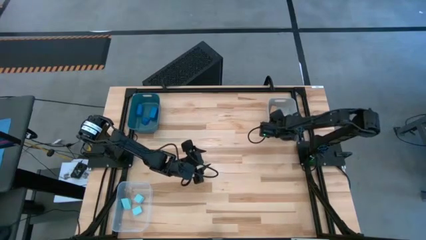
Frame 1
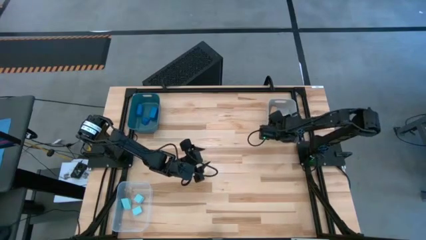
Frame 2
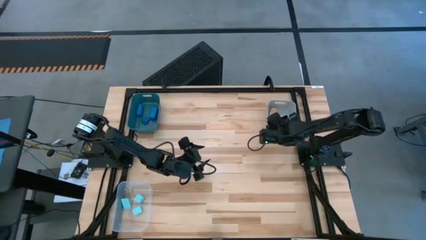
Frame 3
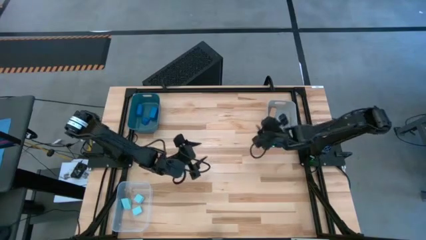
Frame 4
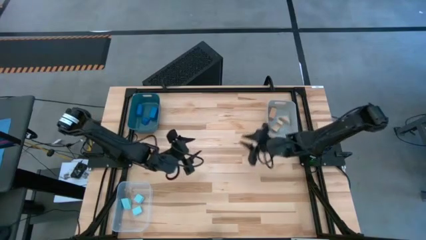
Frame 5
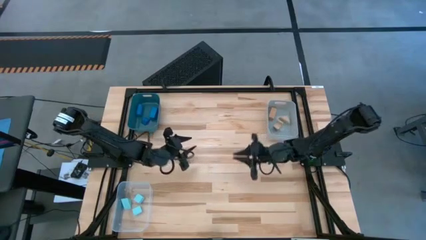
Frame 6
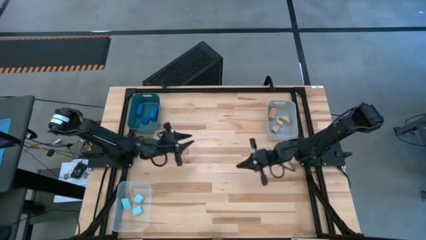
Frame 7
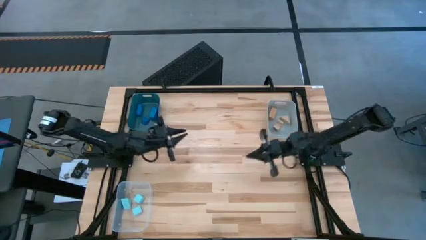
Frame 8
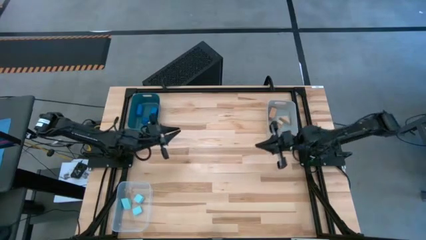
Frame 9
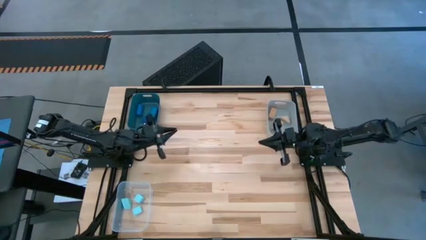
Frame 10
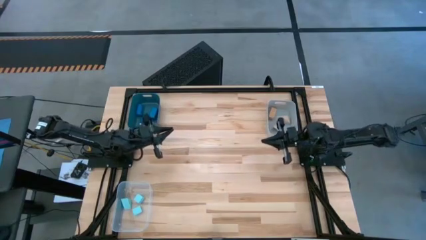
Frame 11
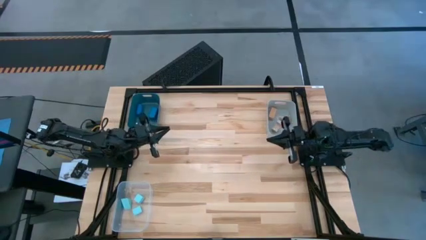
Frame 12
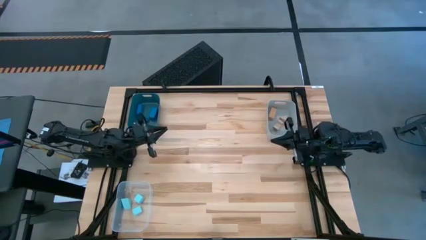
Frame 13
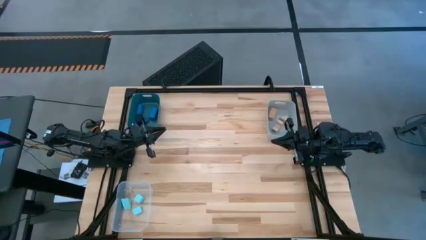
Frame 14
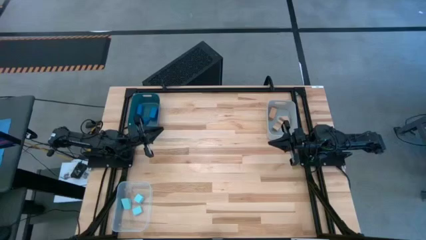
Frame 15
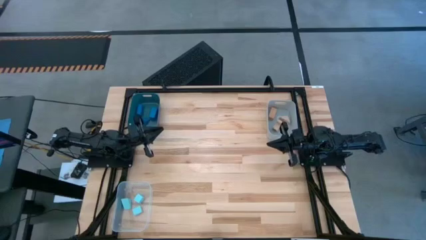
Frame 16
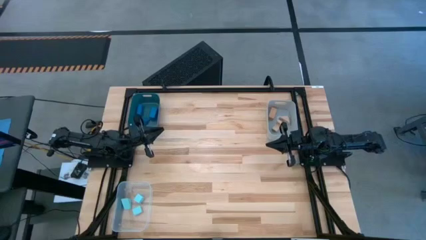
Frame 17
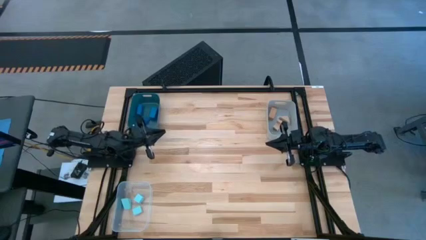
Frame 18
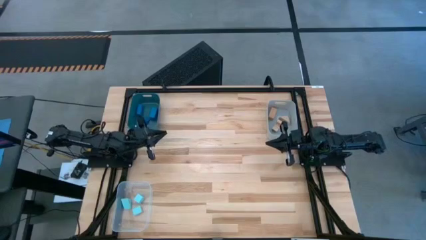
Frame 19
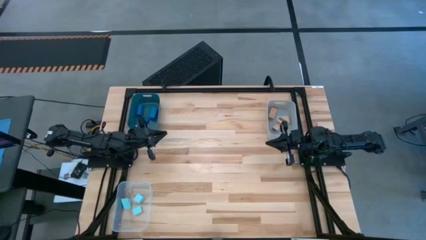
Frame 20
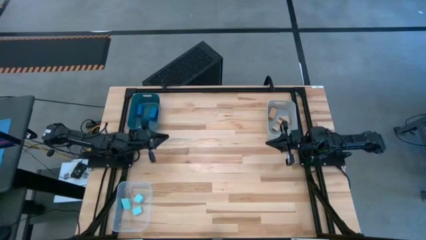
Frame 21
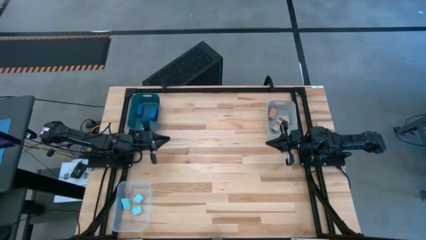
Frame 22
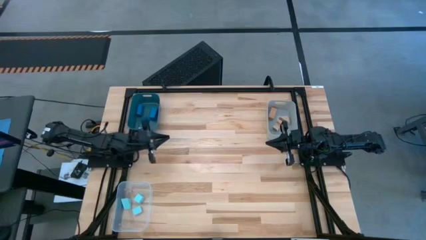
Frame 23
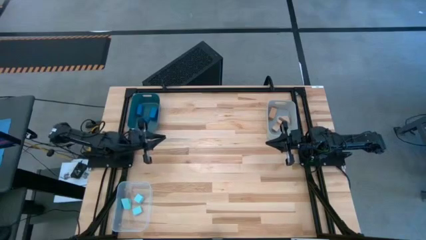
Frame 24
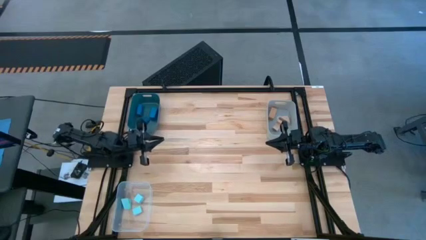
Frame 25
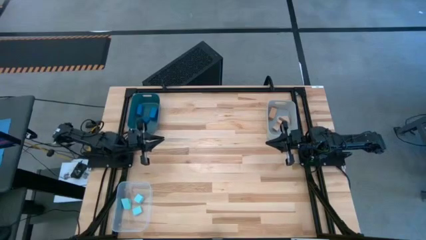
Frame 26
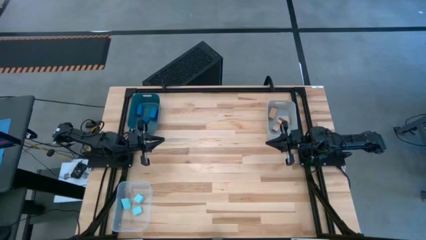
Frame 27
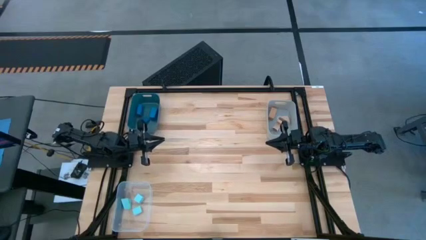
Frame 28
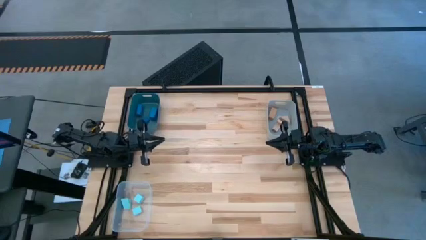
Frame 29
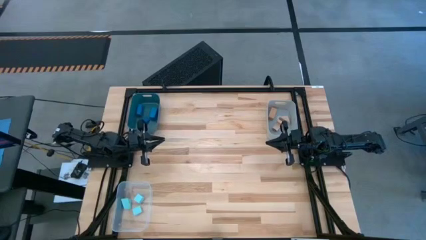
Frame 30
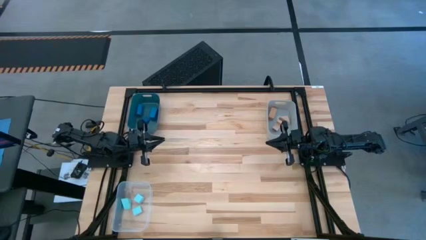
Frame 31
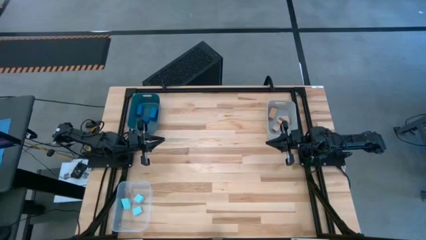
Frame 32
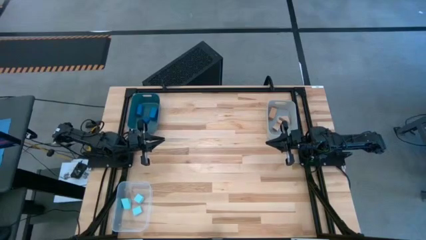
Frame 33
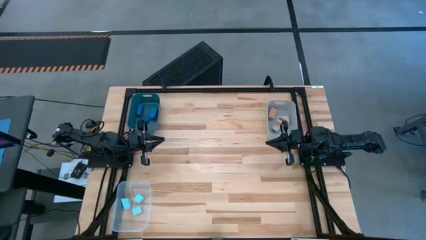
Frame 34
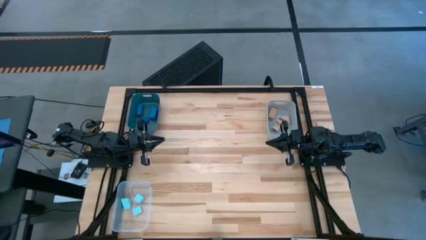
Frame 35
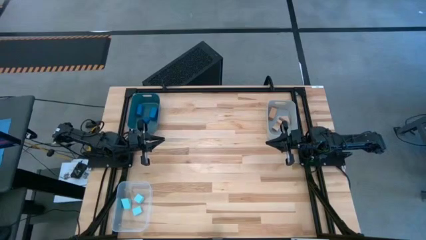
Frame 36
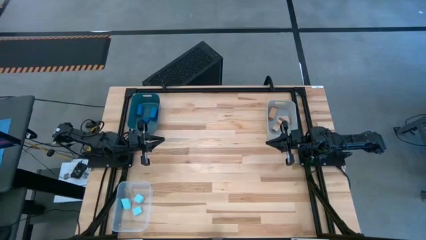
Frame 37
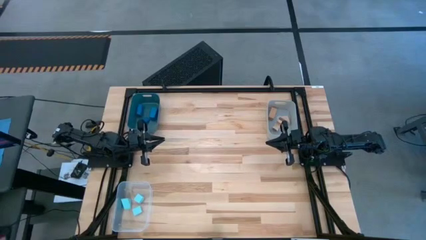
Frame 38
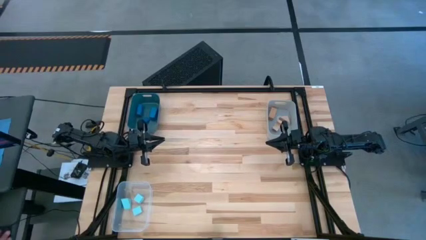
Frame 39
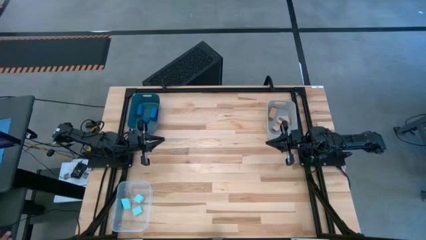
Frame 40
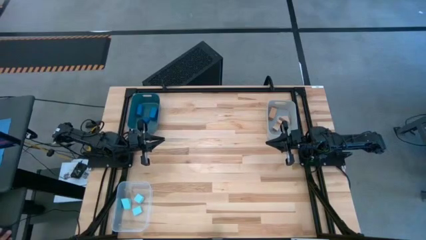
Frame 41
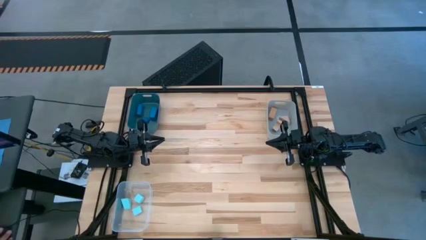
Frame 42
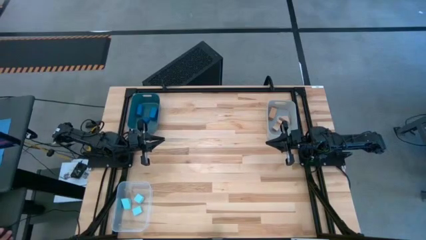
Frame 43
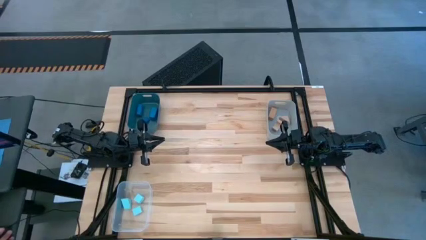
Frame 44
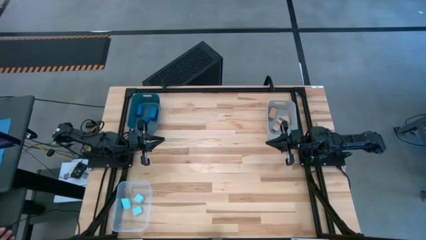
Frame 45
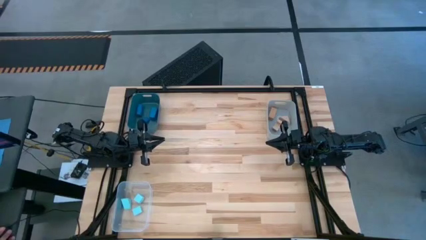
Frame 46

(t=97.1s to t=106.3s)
Task: Sort & place blocks by color
Return to Home Position

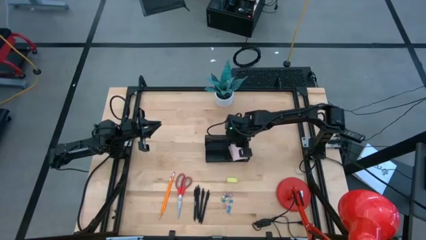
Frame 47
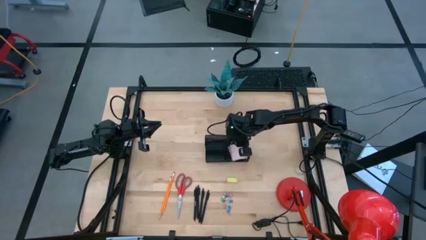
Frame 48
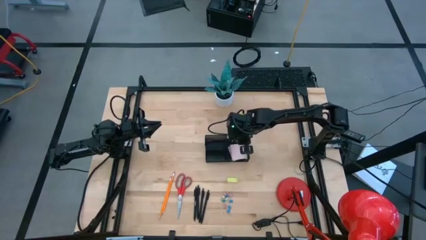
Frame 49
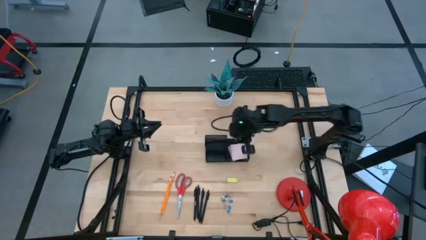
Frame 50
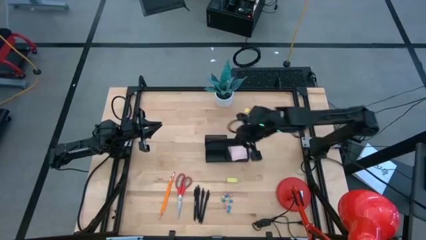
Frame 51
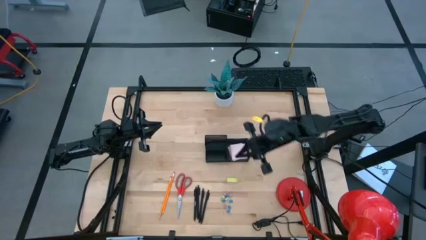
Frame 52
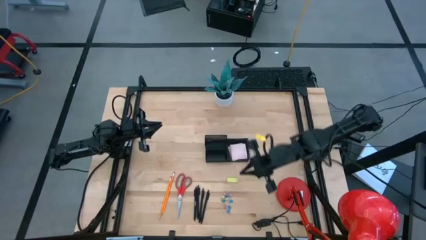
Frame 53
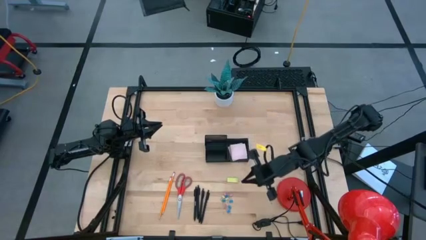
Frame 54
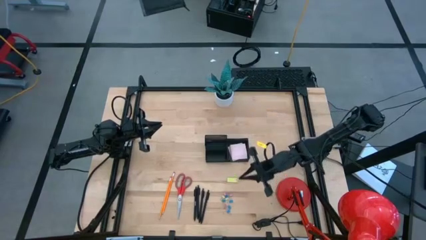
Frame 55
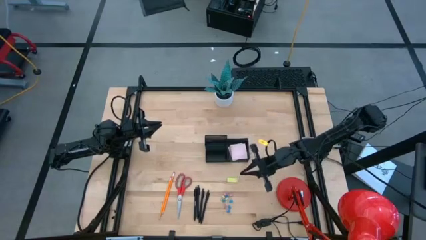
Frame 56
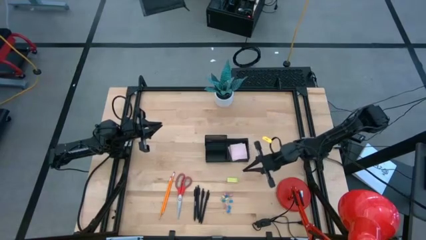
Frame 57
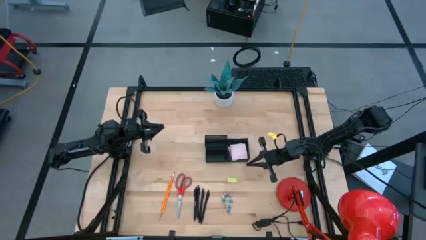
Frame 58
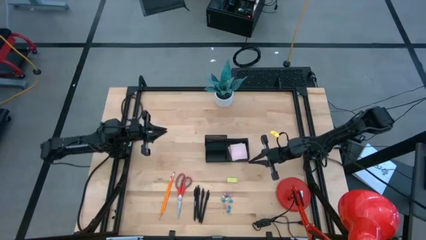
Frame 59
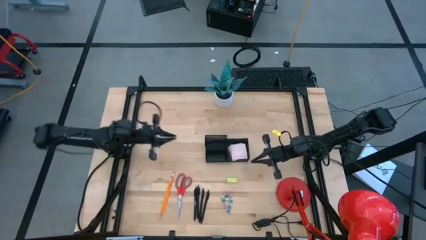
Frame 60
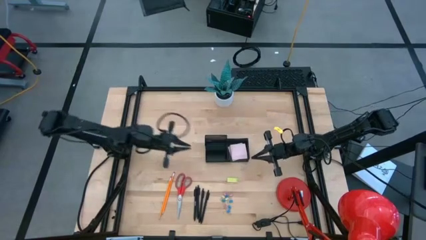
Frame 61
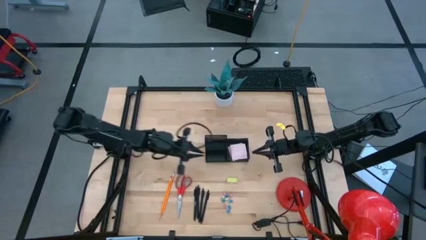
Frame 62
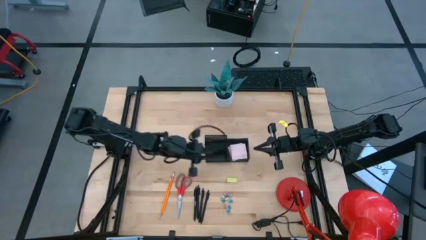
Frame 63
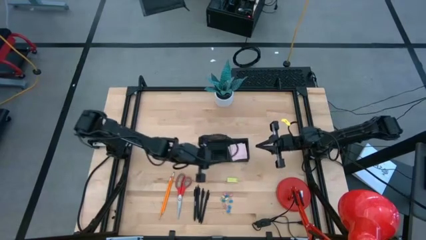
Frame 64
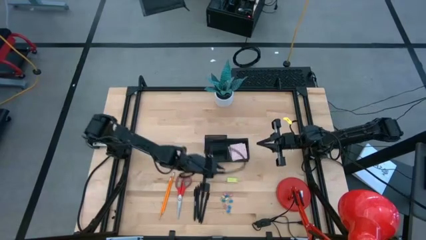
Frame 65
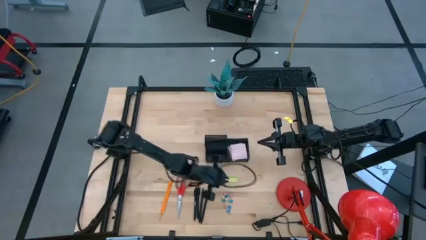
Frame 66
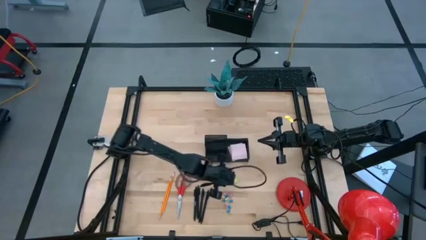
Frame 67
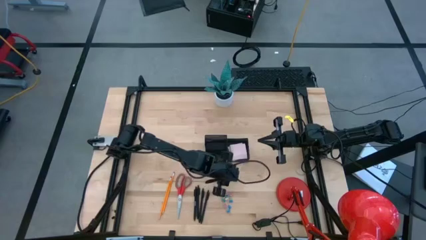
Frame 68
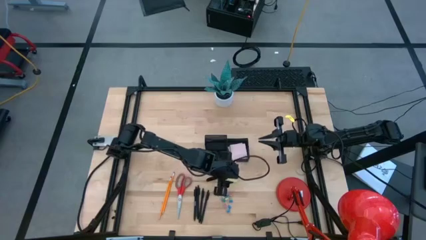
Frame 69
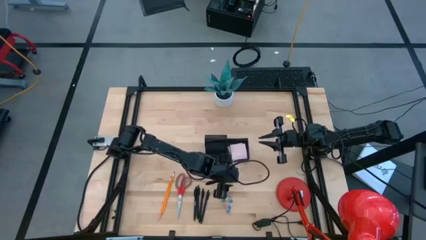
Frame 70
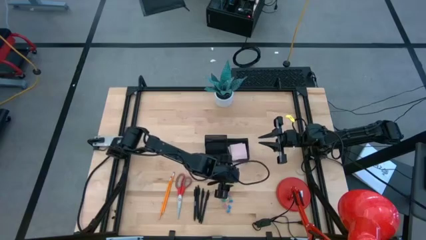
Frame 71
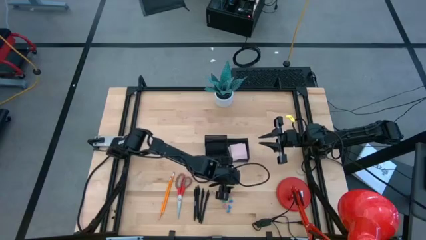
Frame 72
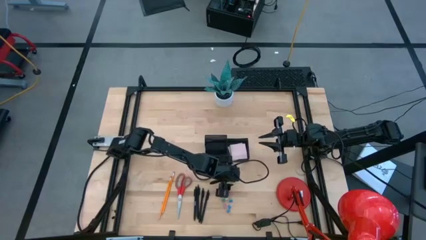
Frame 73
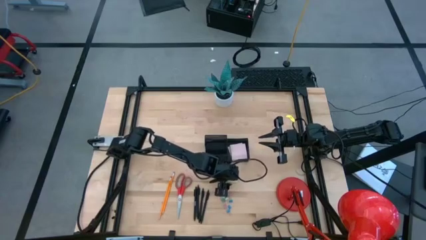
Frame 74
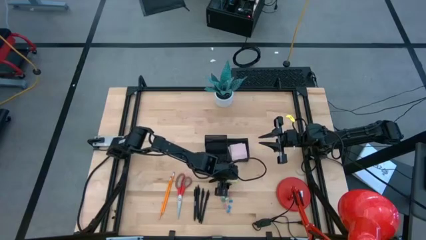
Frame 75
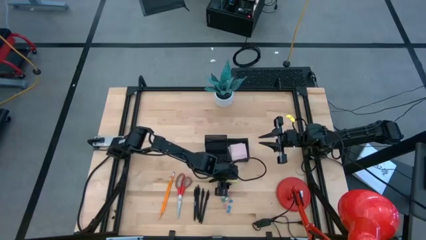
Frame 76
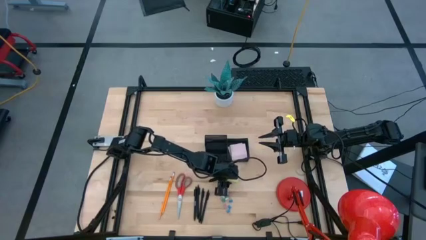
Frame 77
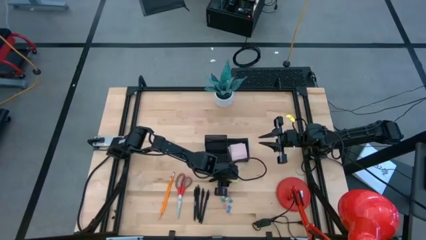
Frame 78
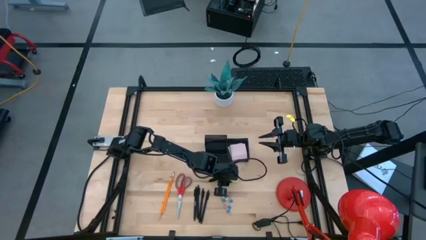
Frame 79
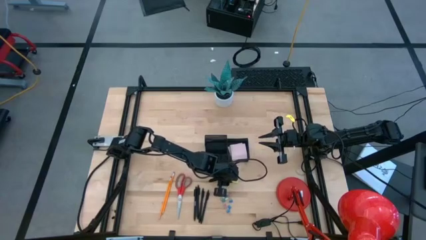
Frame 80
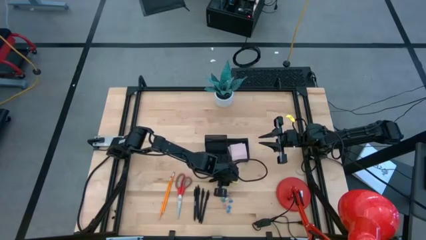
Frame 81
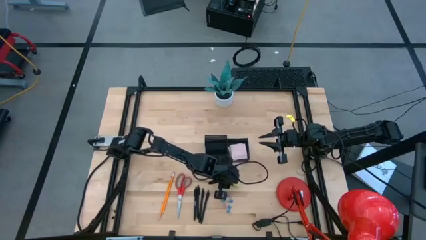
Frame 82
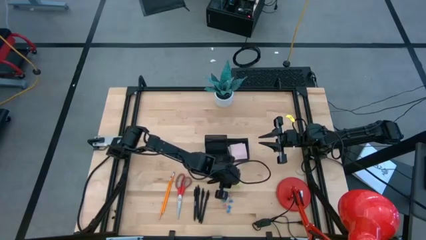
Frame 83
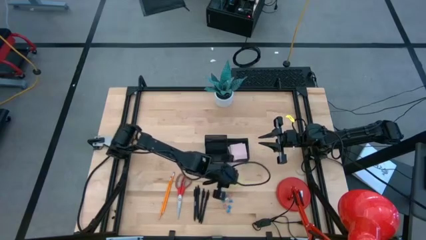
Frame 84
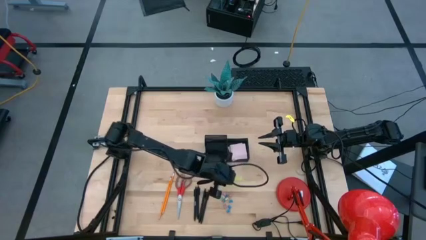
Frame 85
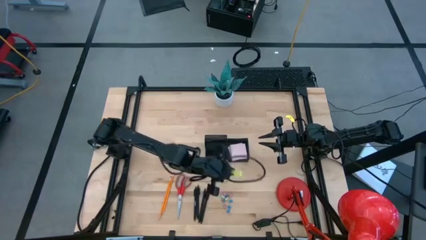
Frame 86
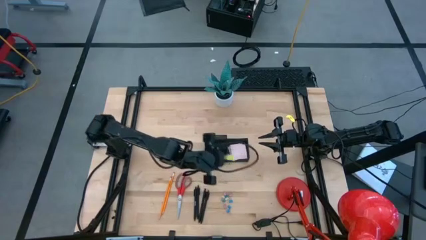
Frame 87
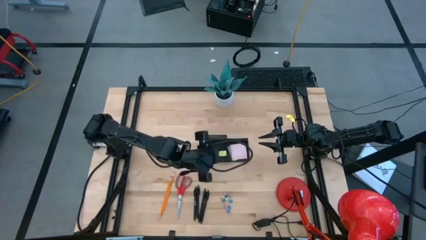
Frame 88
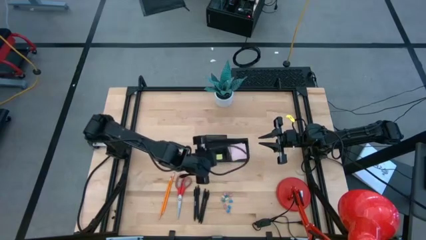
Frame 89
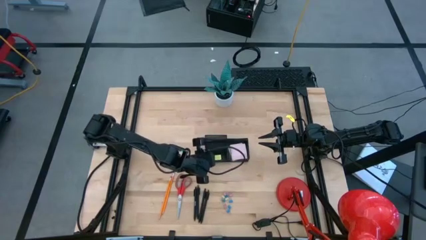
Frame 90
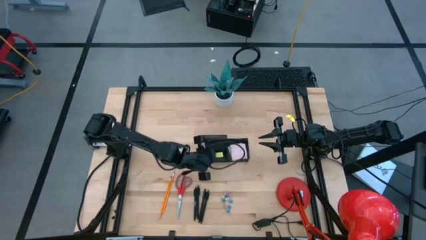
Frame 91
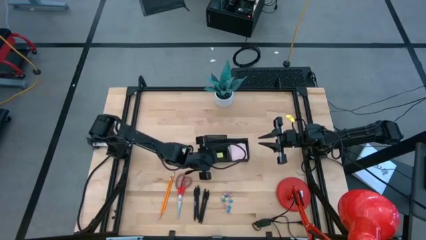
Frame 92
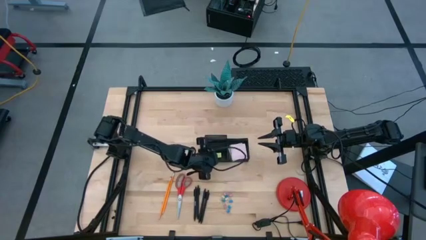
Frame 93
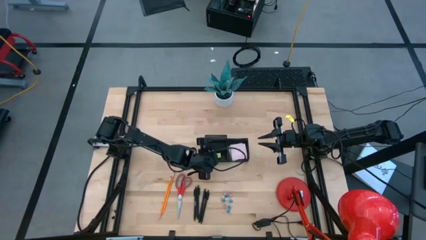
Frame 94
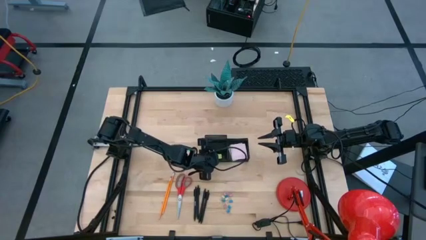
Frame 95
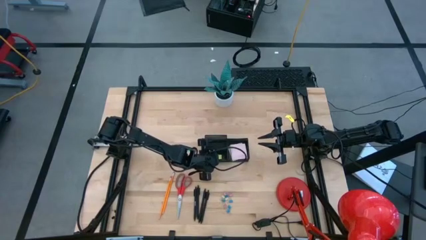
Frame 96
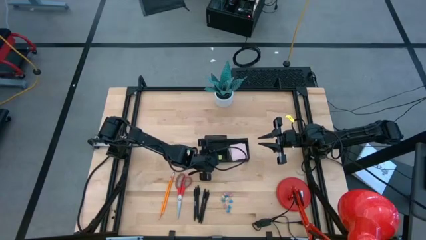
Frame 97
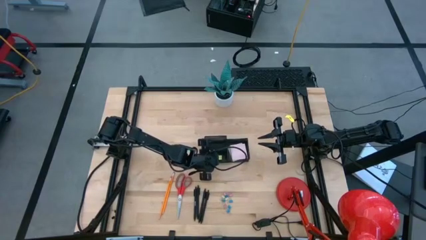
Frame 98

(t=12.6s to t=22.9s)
Task: Pick and place office supplies into organizer
Put the green eraser into the black desk organizer
